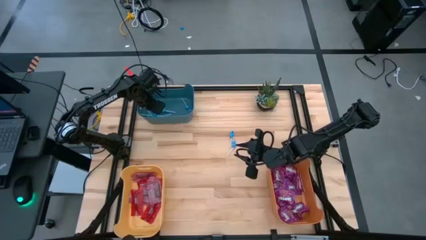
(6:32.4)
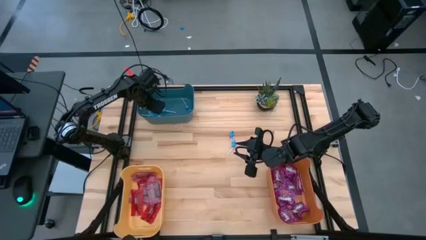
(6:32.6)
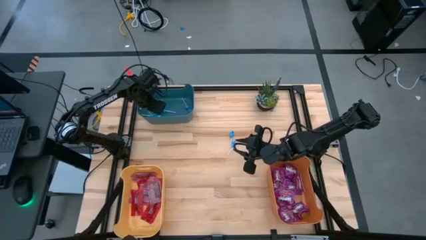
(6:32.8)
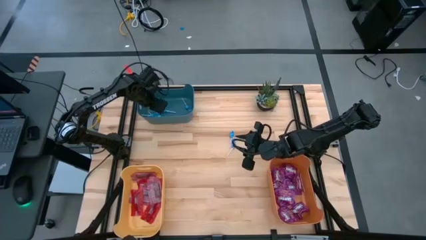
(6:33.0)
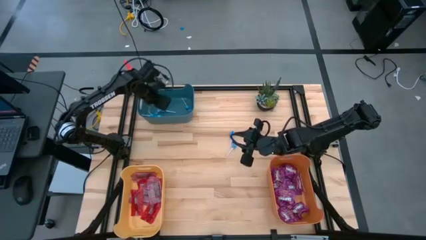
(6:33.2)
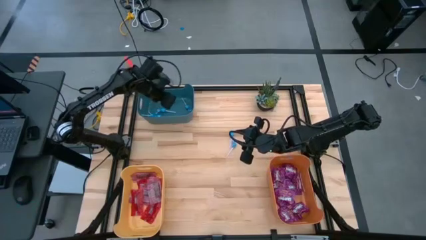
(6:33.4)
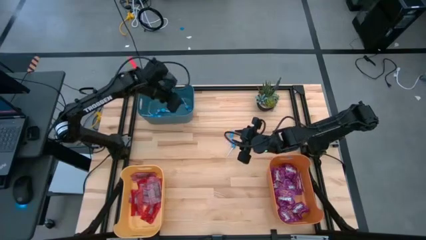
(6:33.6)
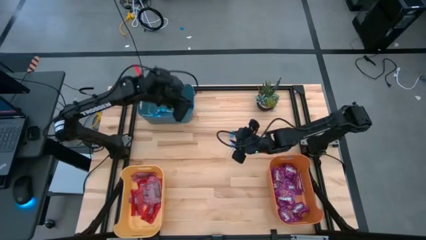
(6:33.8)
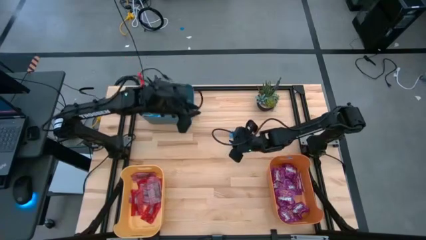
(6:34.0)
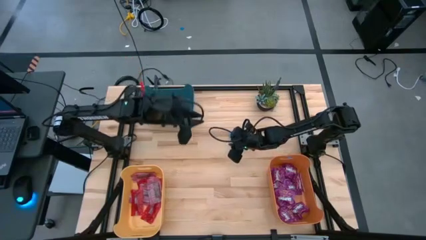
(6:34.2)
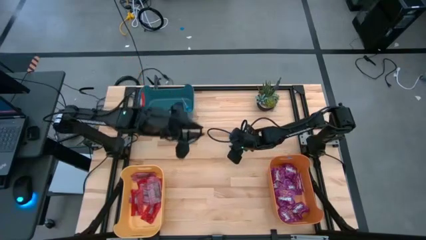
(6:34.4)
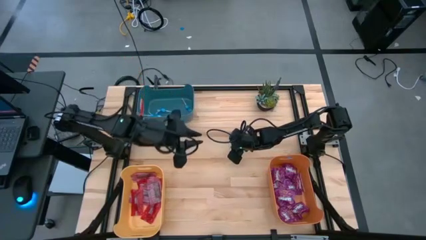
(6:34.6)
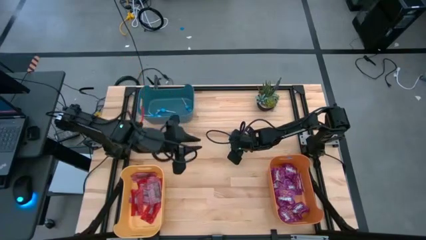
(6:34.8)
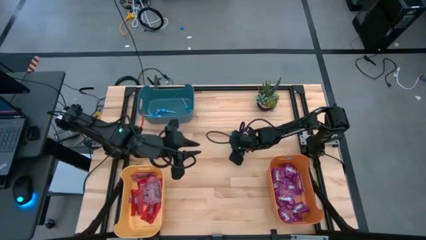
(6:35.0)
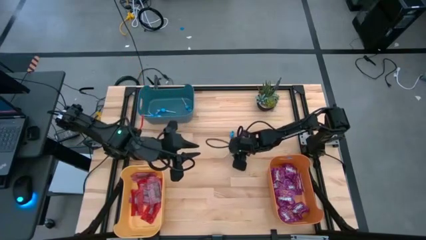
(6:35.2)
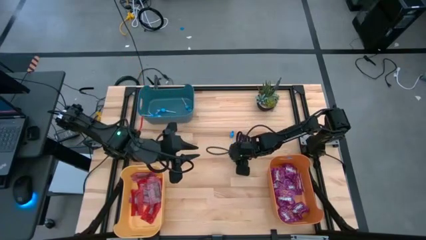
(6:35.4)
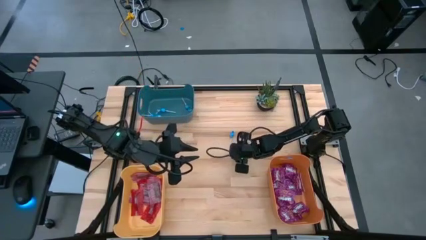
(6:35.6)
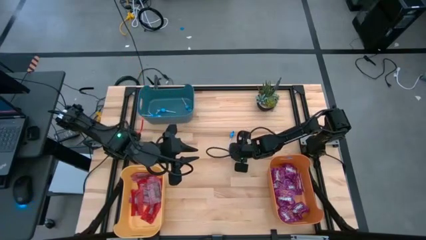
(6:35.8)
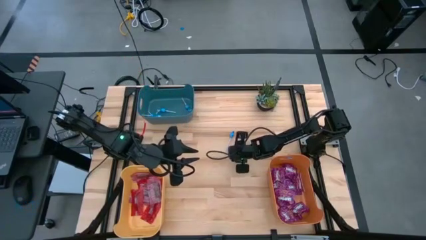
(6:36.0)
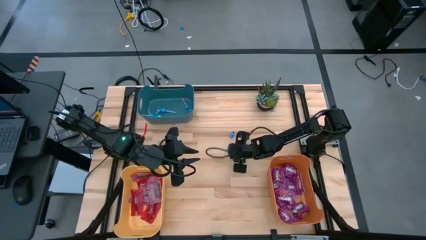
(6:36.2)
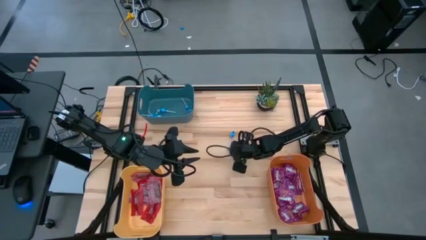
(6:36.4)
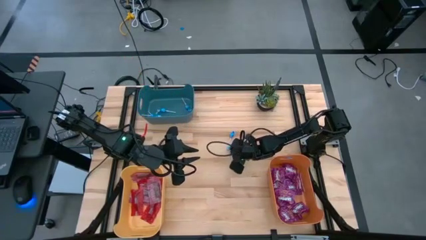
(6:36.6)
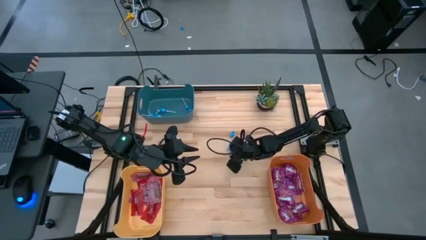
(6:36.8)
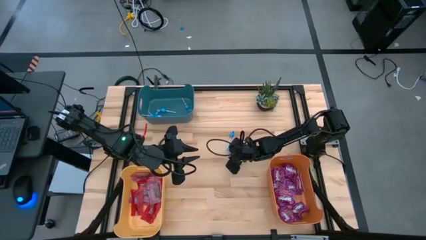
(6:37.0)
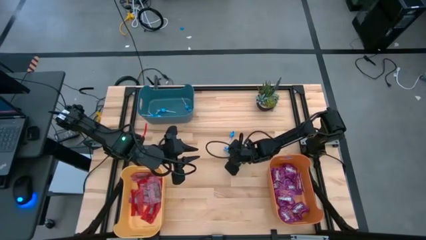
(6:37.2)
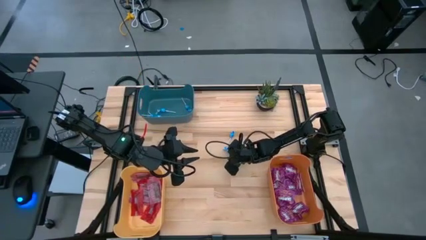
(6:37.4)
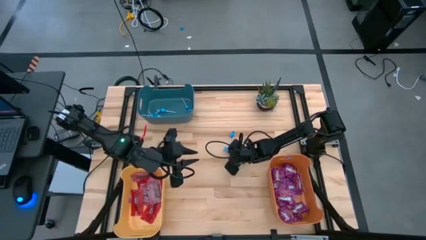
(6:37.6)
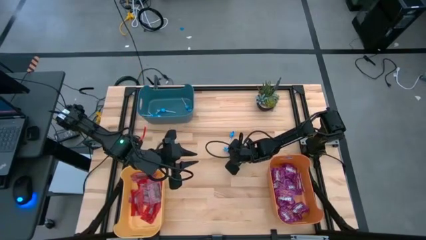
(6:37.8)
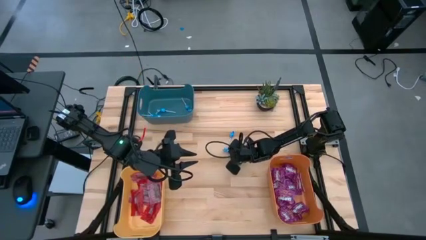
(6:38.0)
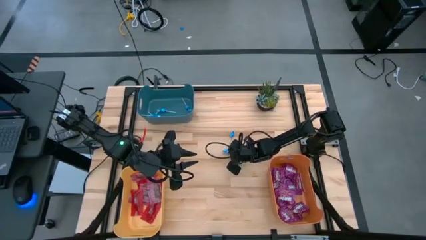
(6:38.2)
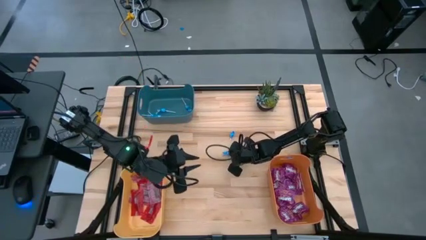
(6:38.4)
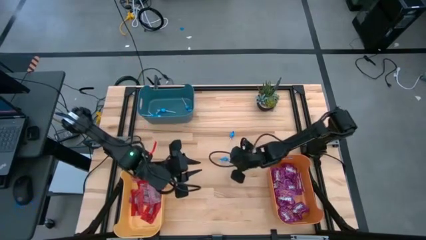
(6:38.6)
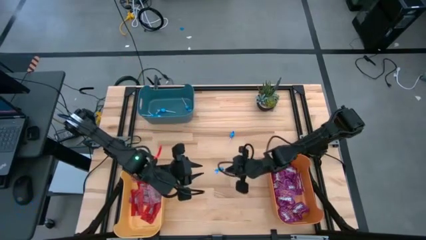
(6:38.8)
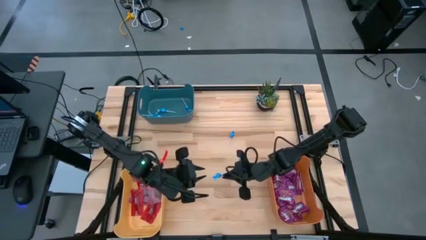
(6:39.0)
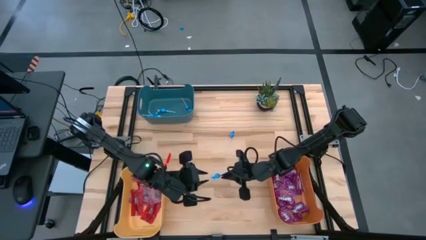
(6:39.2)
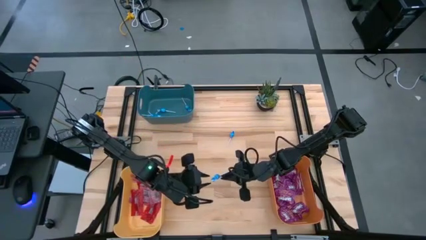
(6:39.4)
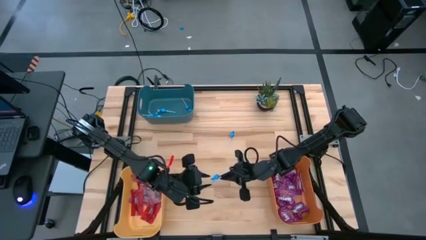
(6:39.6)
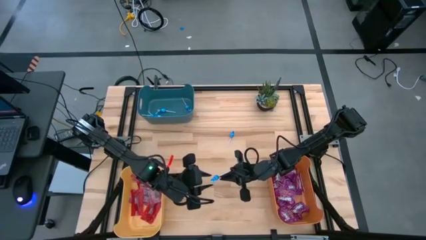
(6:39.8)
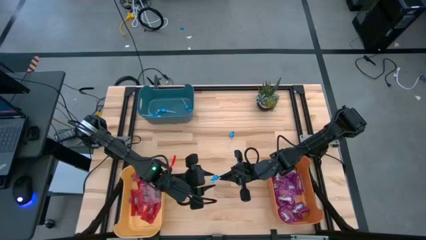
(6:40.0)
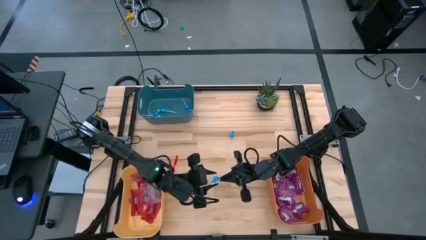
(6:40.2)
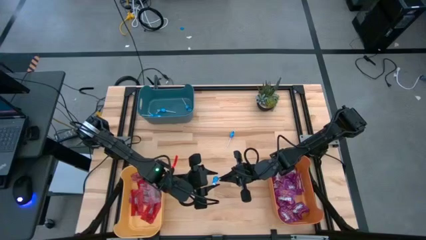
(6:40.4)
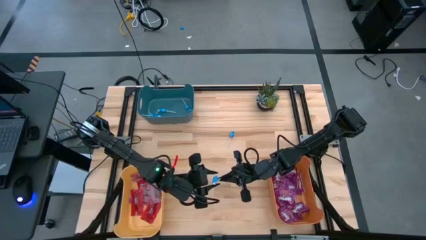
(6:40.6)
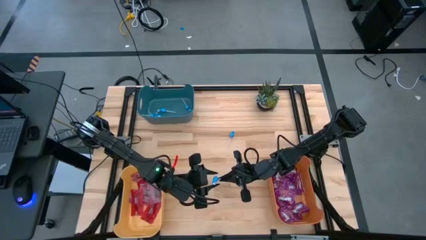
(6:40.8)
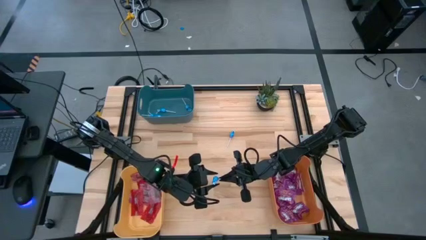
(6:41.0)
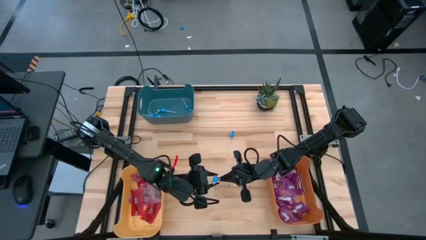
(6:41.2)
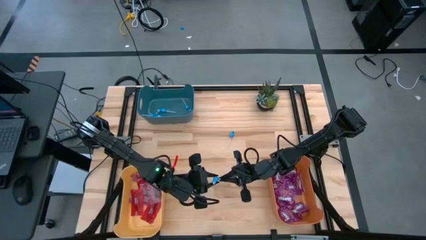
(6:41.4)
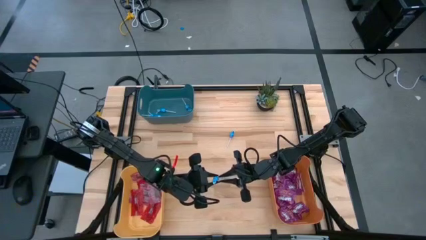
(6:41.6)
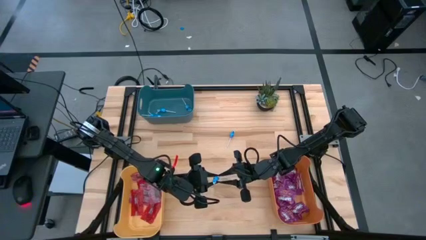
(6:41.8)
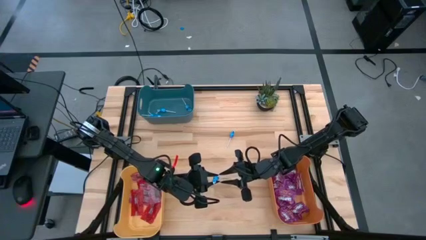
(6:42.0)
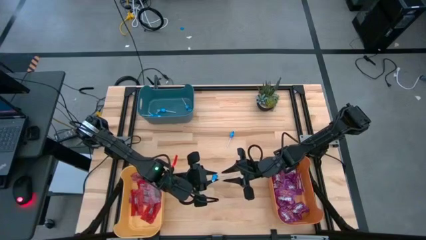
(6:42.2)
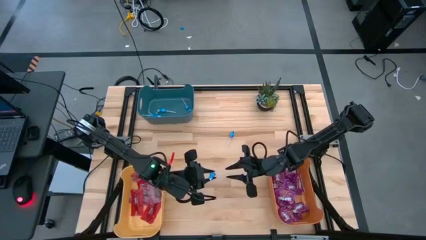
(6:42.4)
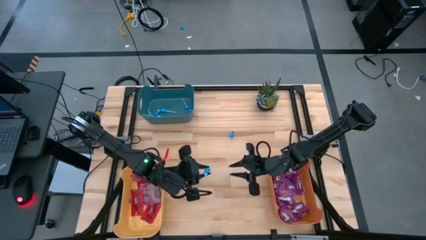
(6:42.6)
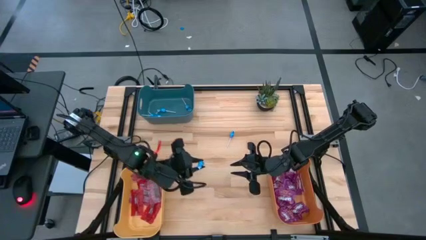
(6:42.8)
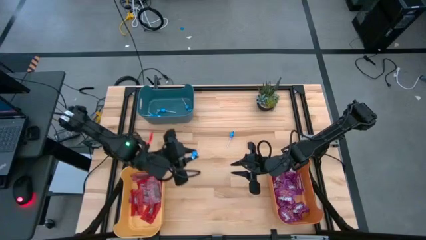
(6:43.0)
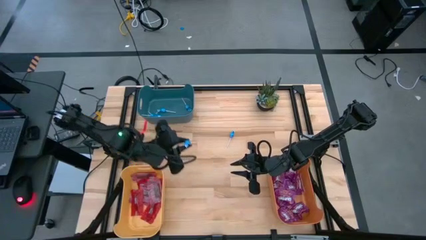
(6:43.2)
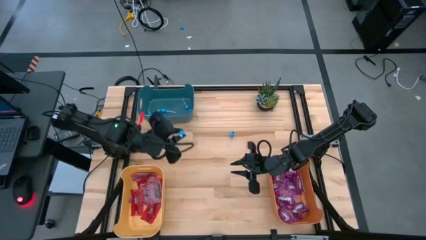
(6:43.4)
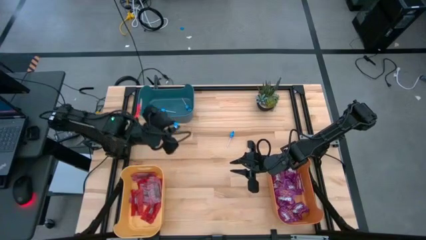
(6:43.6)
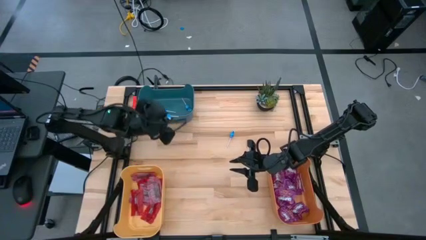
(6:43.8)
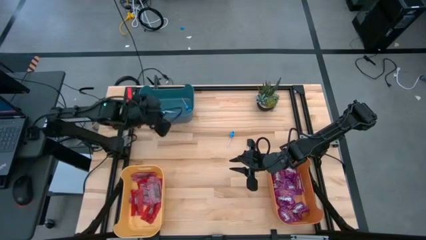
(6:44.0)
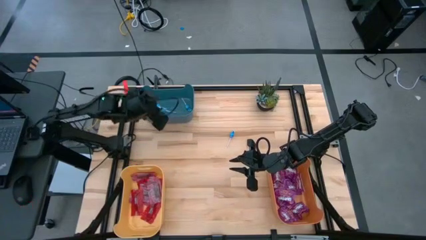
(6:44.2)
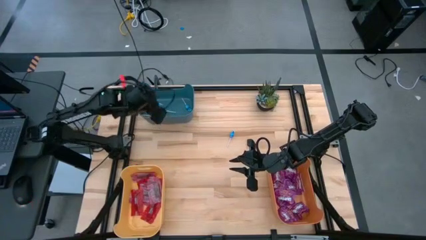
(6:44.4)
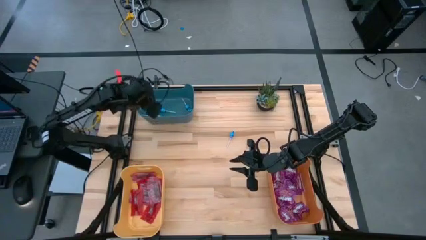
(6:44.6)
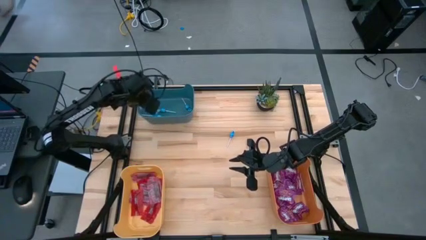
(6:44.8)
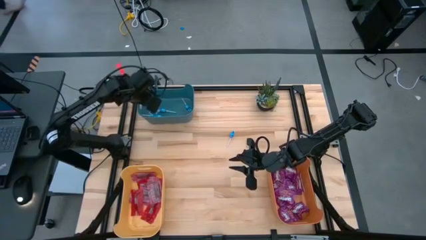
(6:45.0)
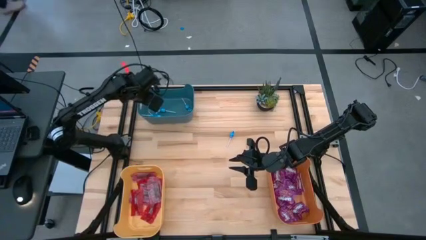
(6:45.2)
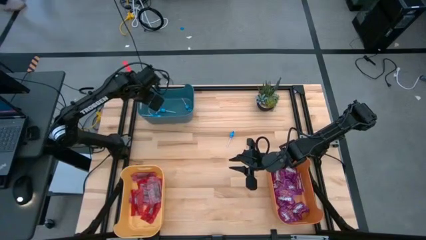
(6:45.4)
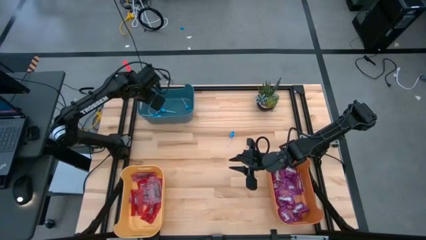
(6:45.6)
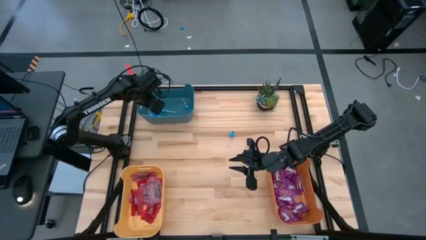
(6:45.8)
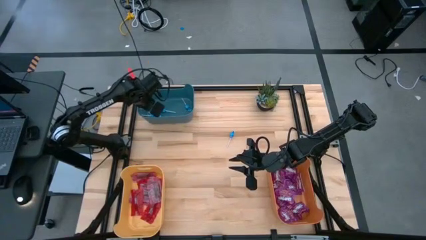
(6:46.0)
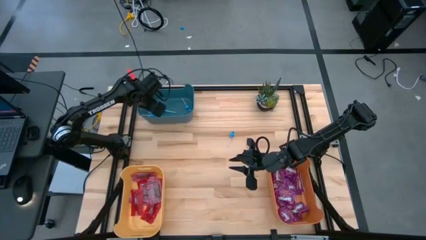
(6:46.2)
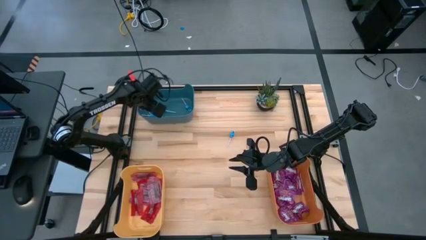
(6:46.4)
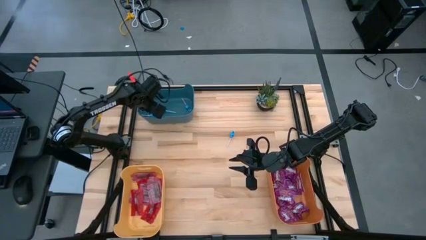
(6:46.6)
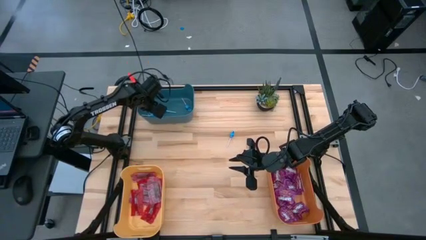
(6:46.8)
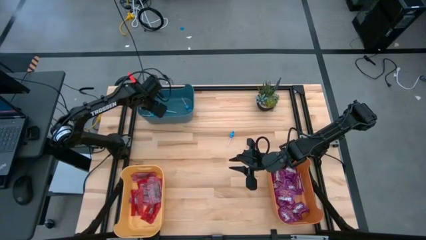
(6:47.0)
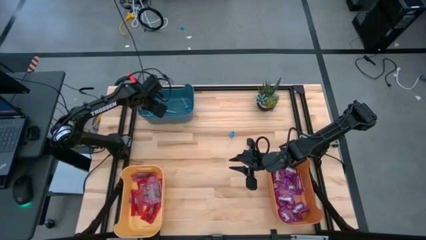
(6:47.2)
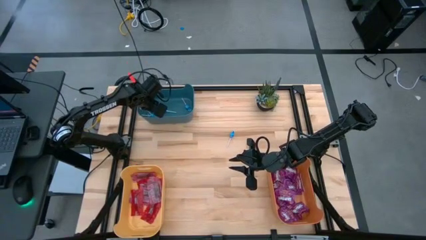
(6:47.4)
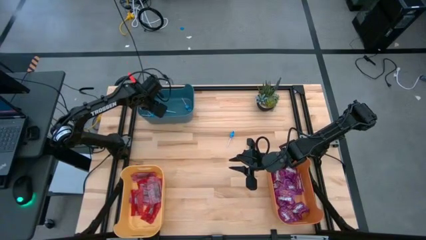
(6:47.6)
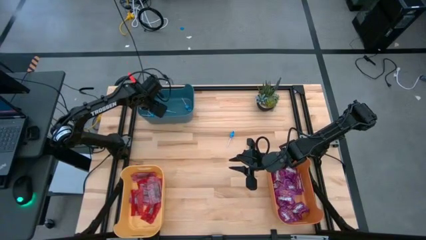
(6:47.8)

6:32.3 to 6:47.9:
Task: Sort candy
Put the blue candy into the blue bin

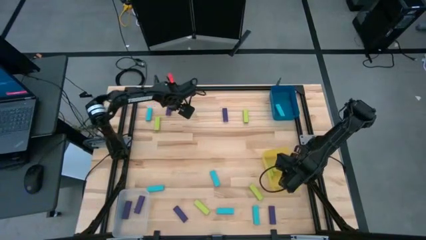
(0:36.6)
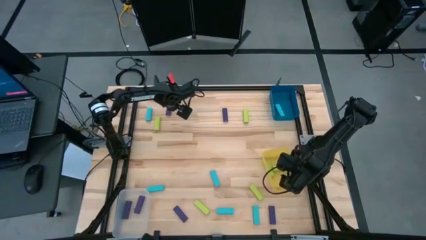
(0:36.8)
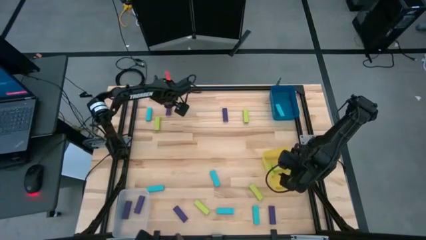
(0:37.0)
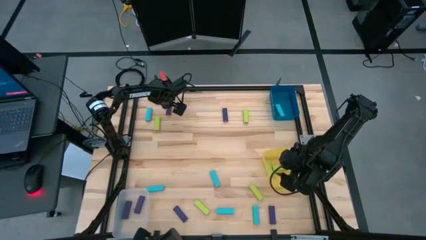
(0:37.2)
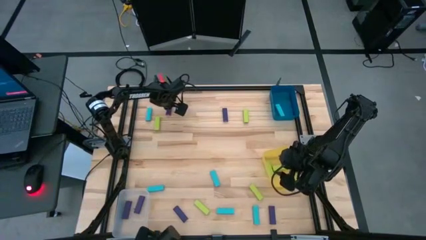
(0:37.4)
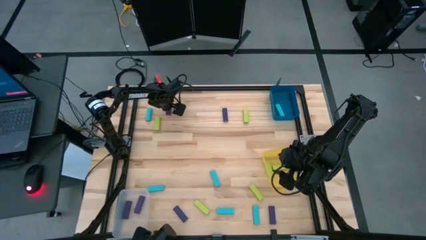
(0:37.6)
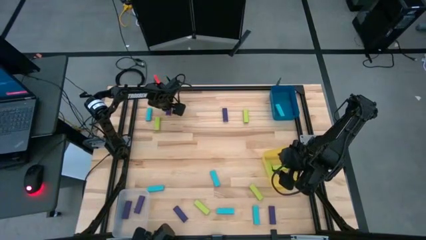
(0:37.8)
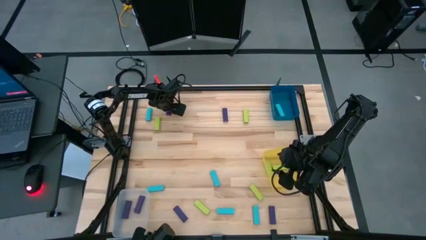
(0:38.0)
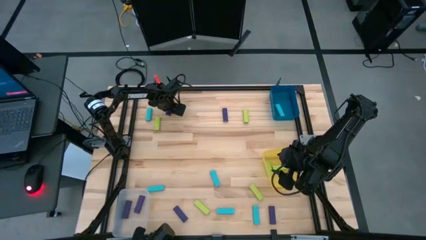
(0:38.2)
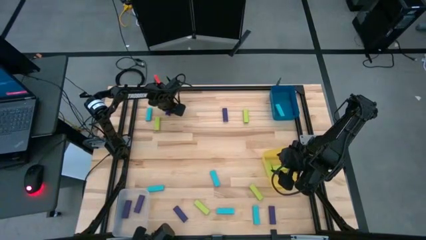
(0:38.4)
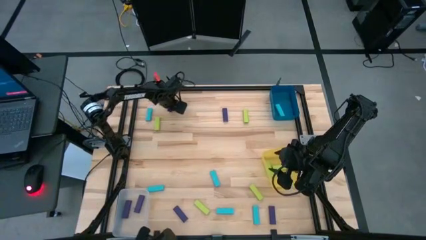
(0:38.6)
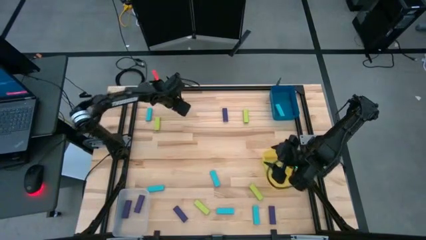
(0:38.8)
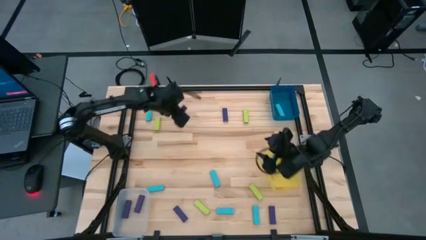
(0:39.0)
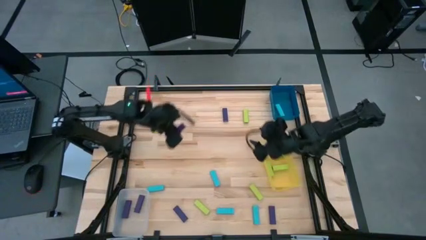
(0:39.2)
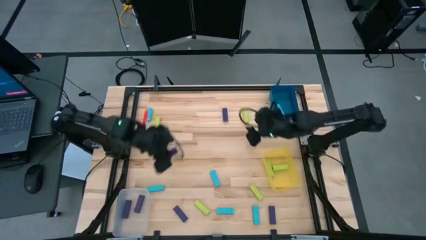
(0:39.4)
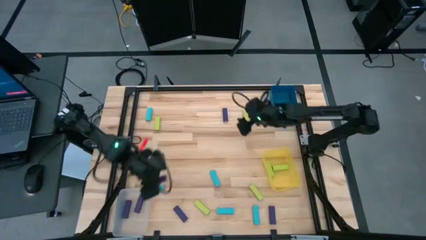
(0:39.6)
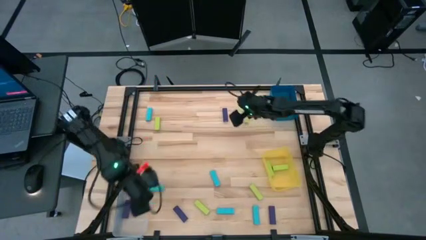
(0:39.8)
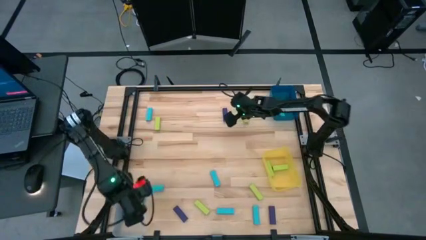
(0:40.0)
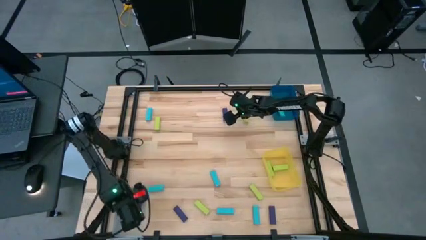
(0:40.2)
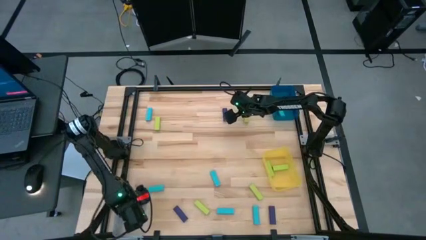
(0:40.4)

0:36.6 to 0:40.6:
Task: Sort blocks
Put the violet block into the transparent bin
